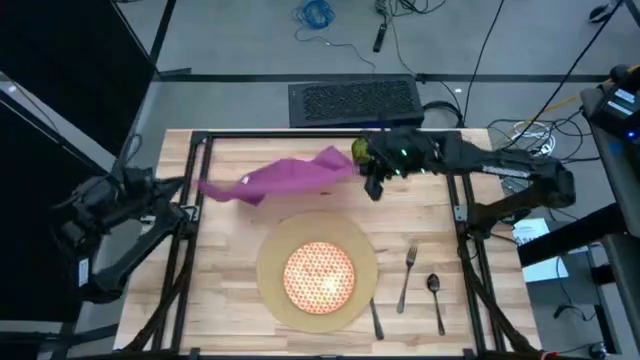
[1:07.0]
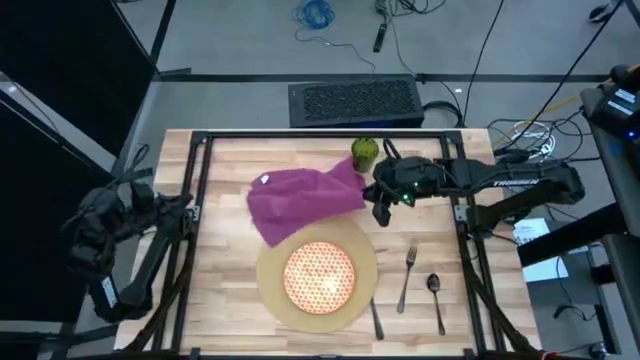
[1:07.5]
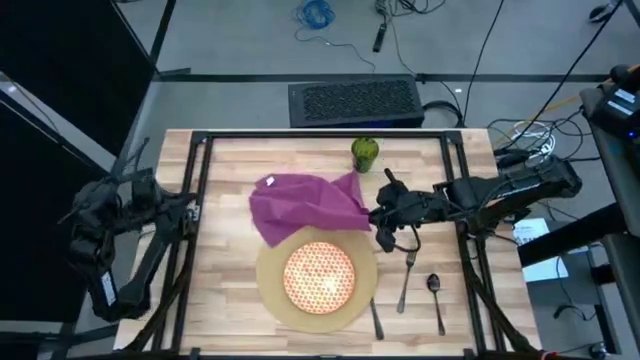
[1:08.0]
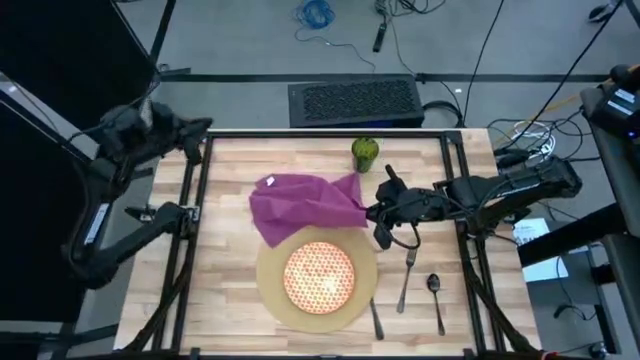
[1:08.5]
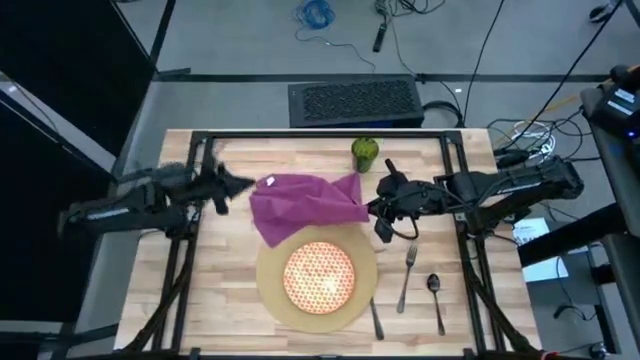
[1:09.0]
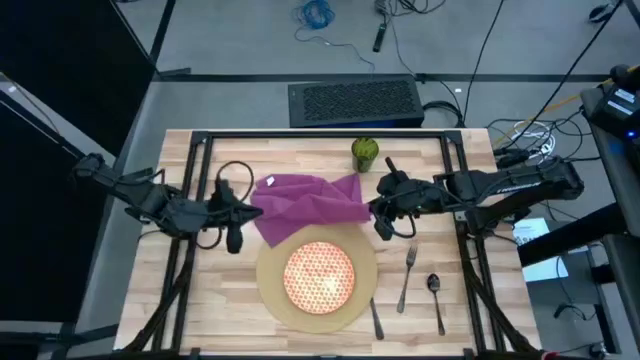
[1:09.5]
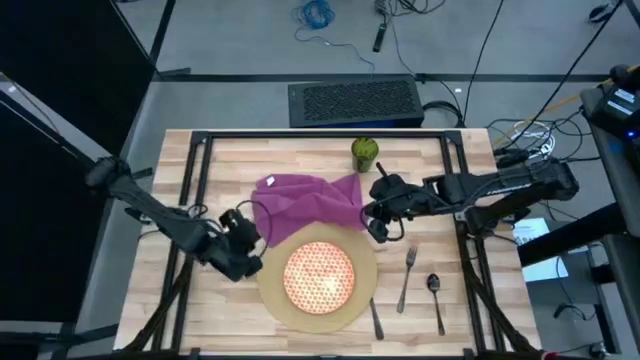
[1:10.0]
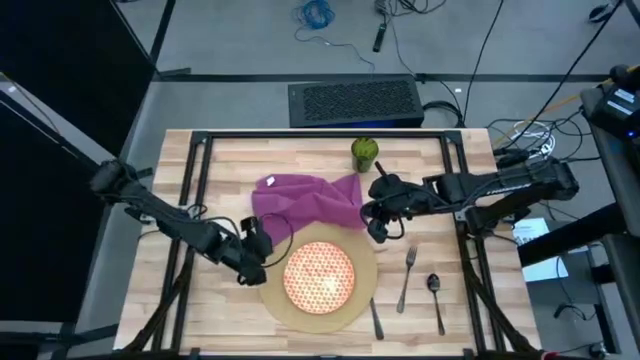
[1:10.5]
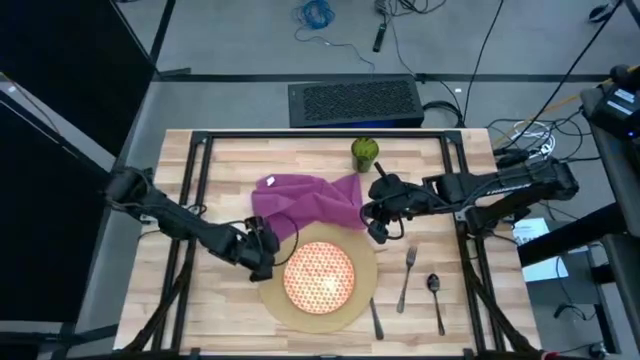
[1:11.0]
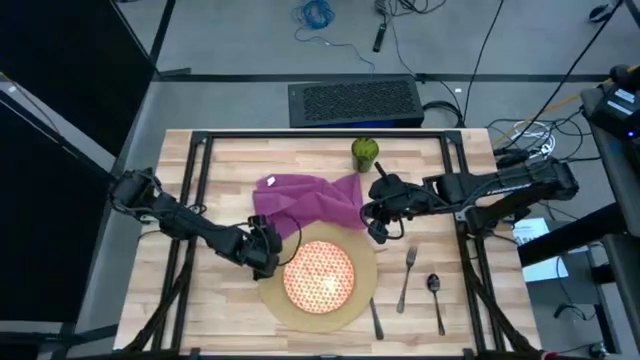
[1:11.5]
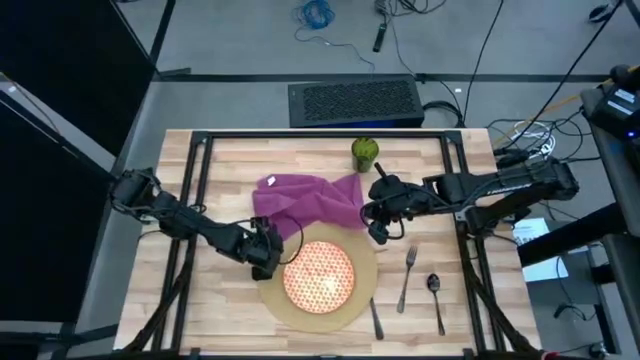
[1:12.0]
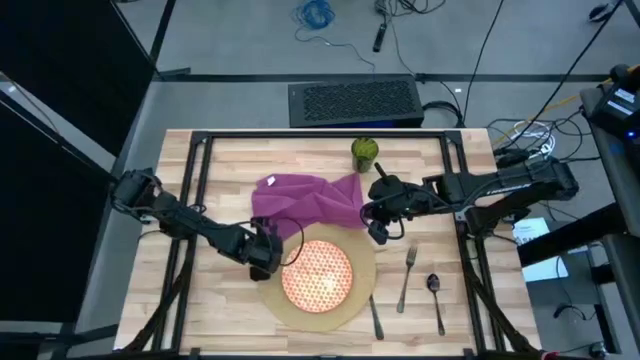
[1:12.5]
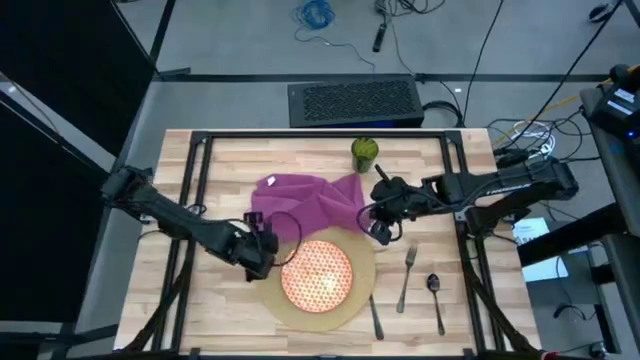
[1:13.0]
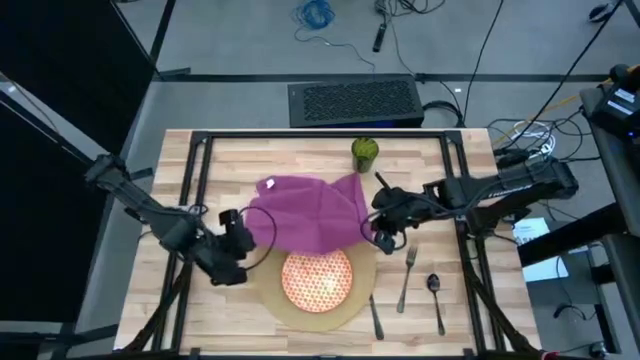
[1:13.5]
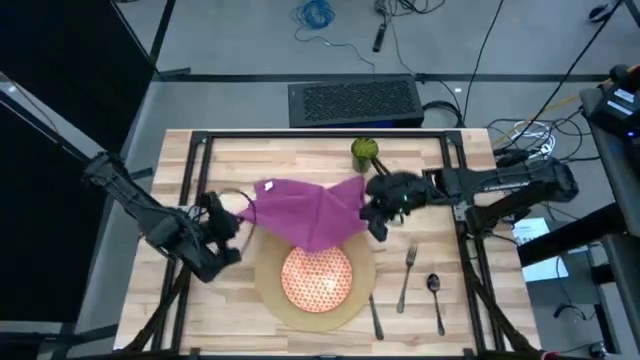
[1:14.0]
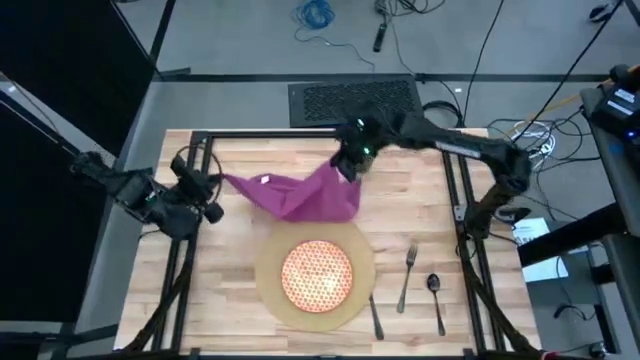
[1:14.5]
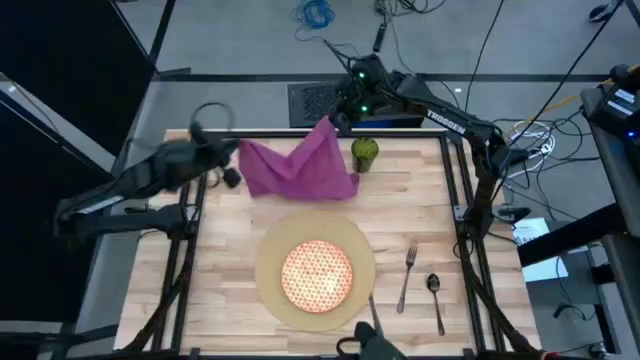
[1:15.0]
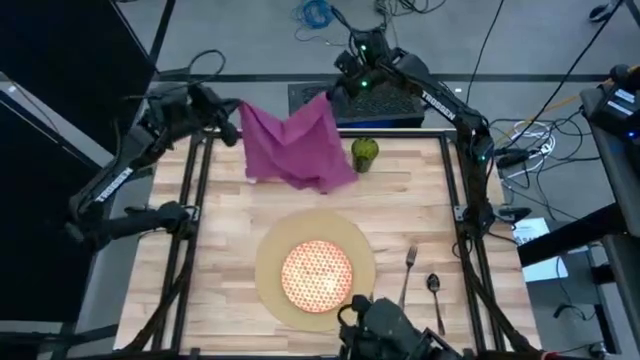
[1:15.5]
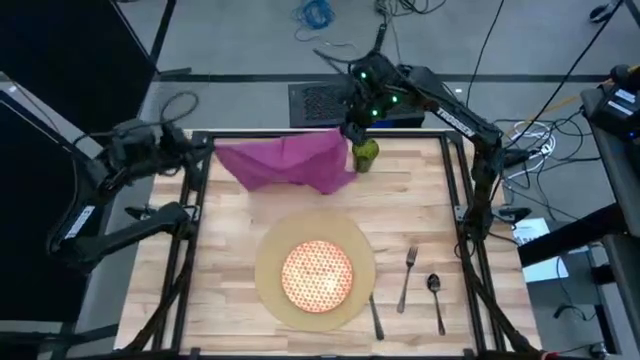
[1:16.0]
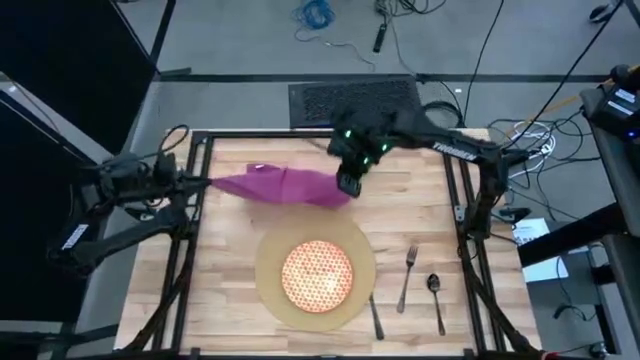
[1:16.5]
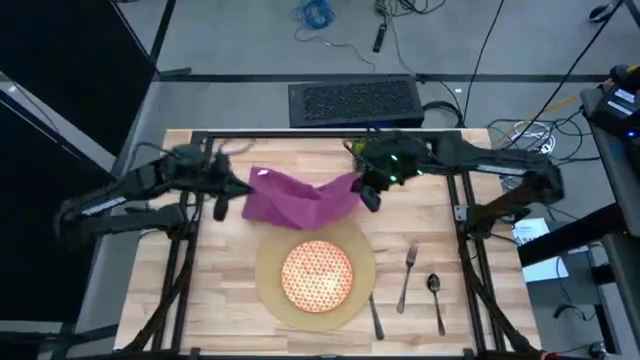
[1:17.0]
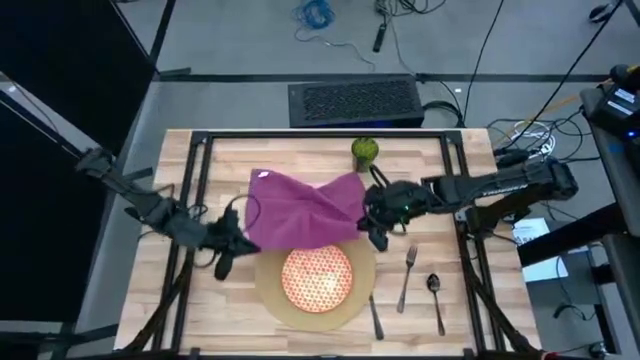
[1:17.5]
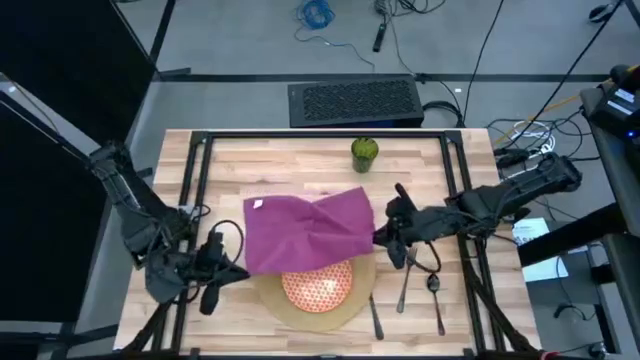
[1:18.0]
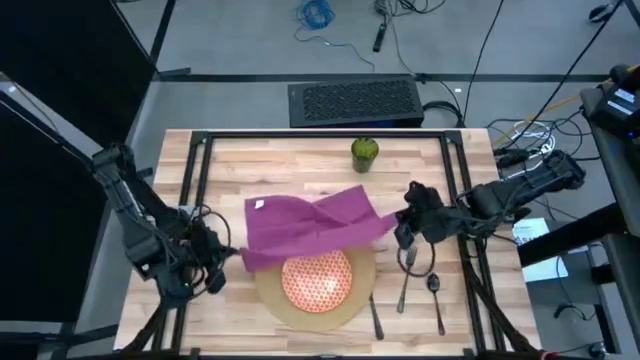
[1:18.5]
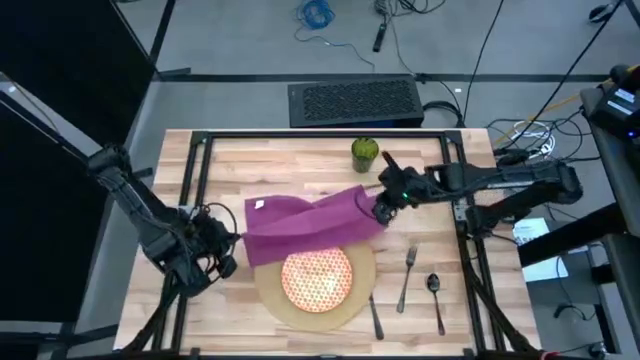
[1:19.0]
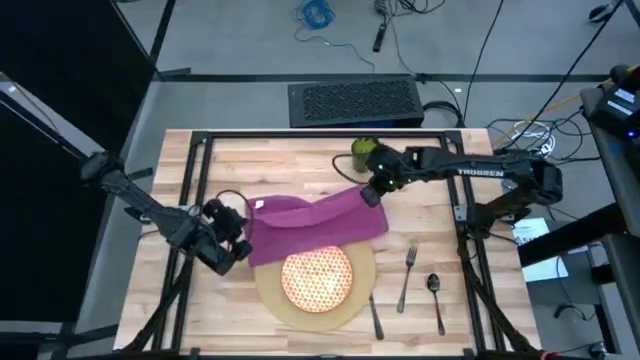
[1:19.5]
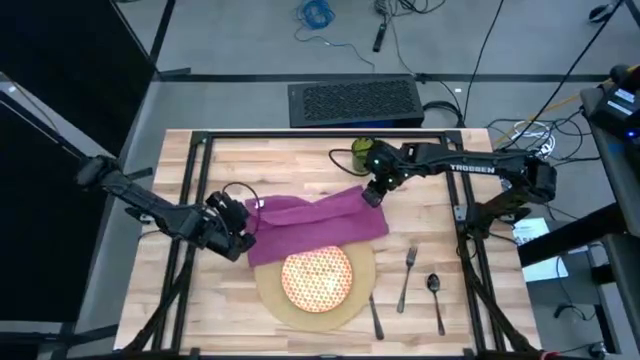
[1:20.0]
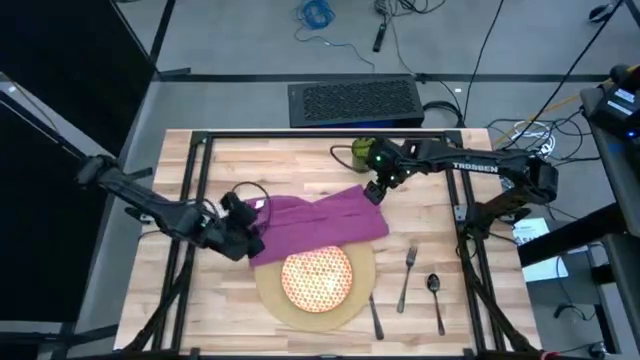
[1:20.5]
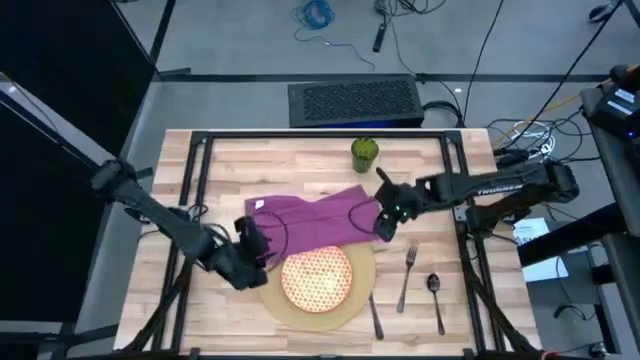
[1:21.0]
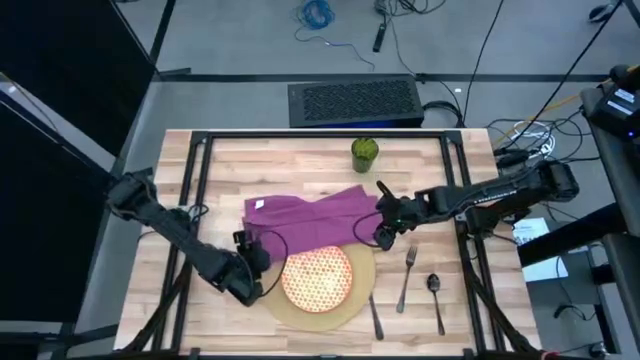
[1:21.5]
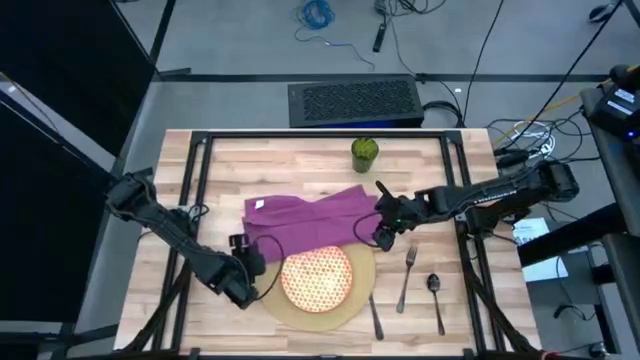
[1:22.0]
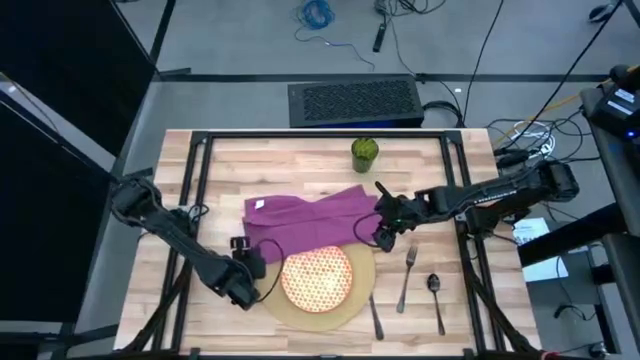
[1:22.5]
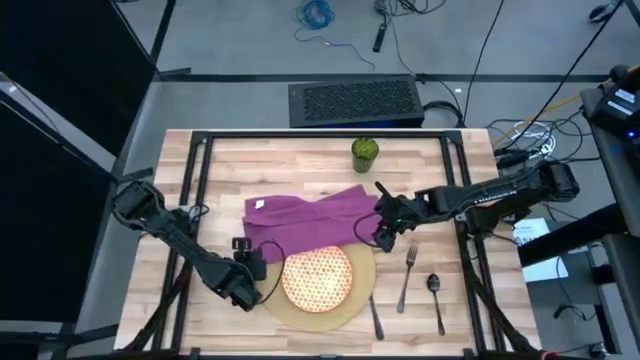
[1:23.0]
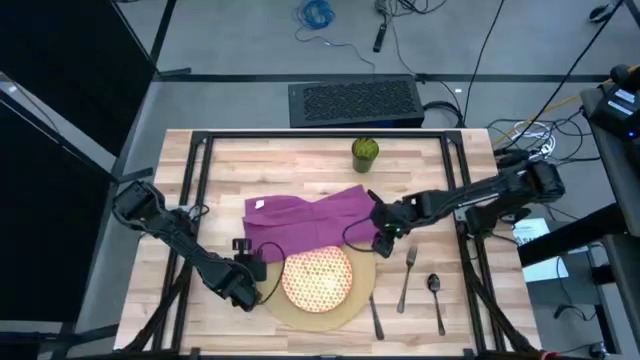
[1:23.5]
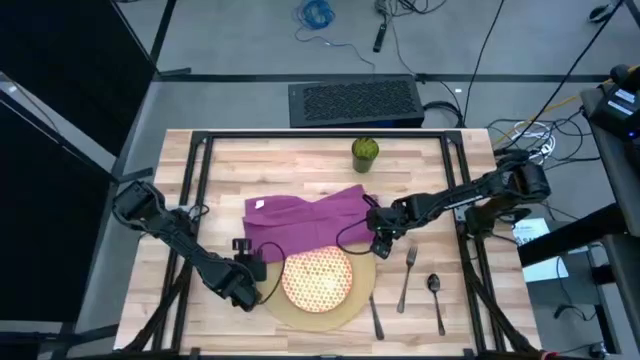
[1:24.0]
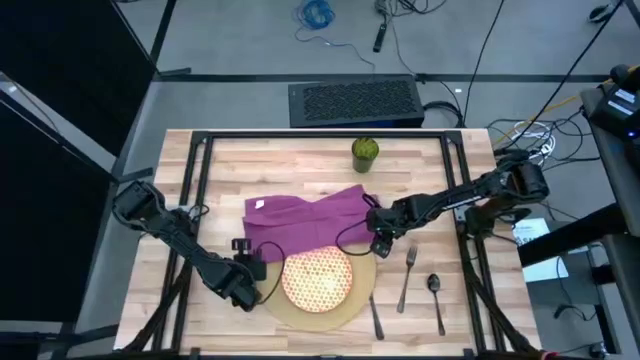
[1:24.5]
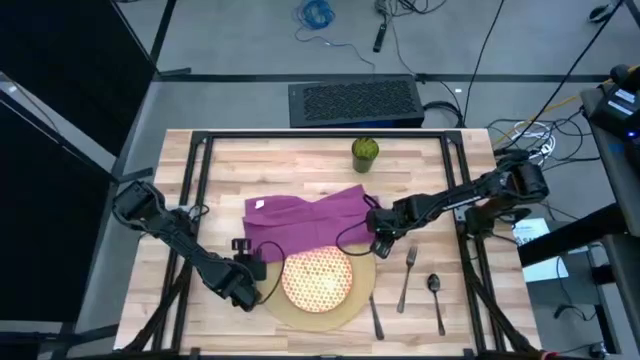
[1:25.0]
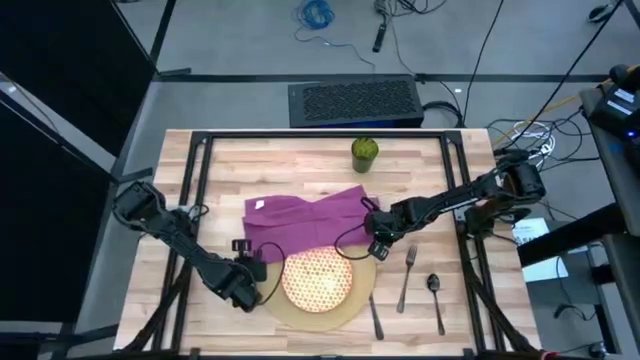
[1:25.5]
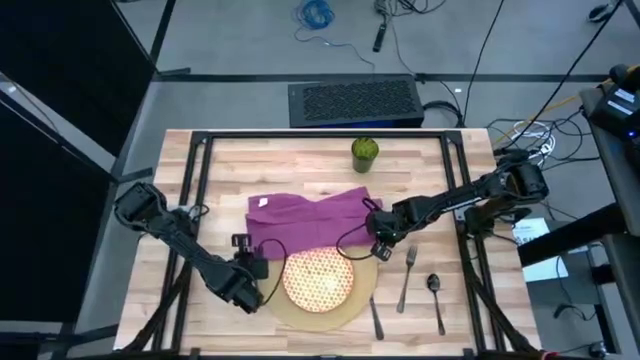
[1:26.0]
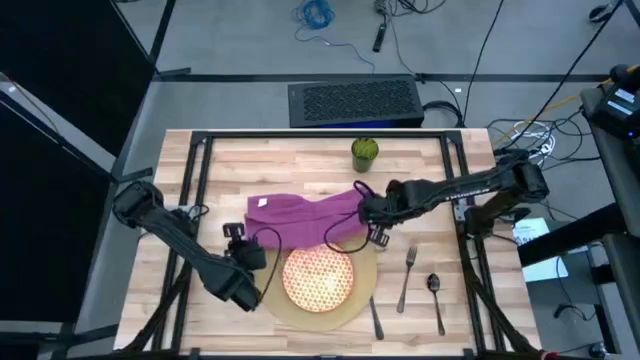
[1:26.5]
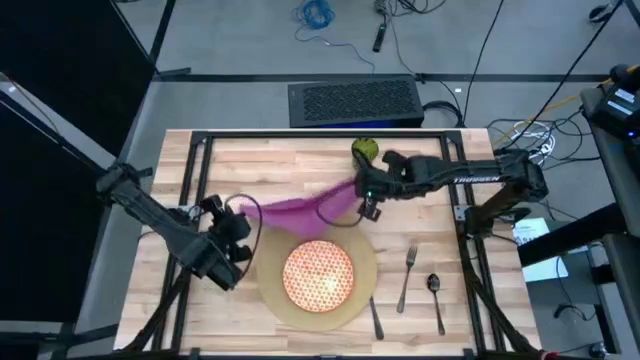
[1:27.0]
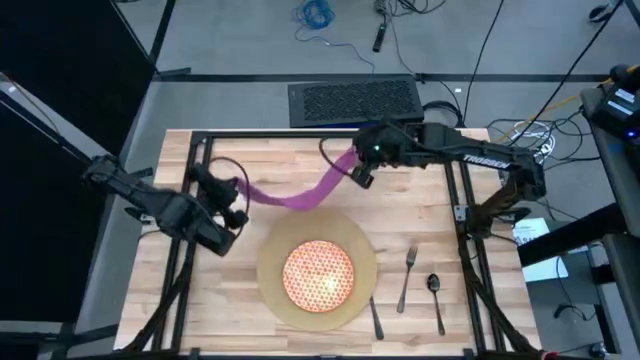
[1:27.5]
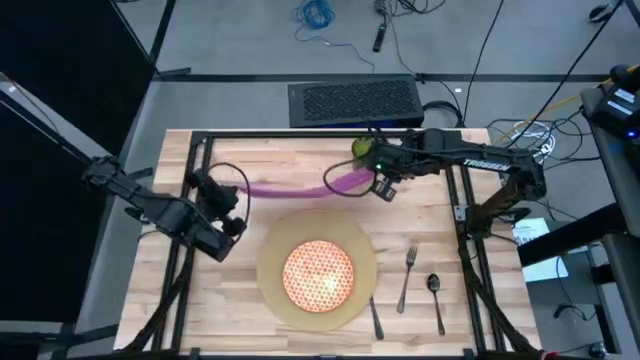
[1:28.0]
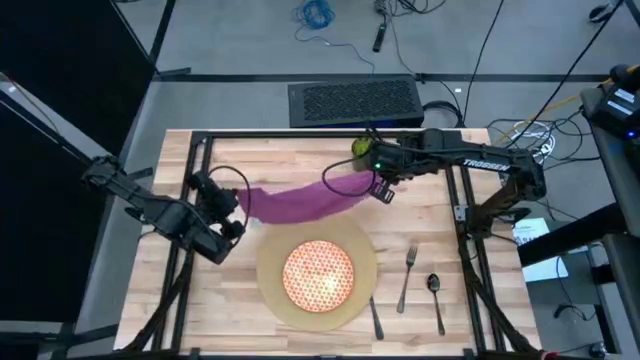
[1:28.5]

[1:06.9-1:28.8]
Task: Set table place
Fold the purple table napkin
